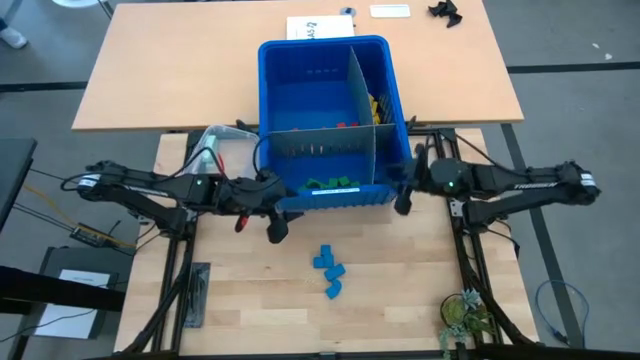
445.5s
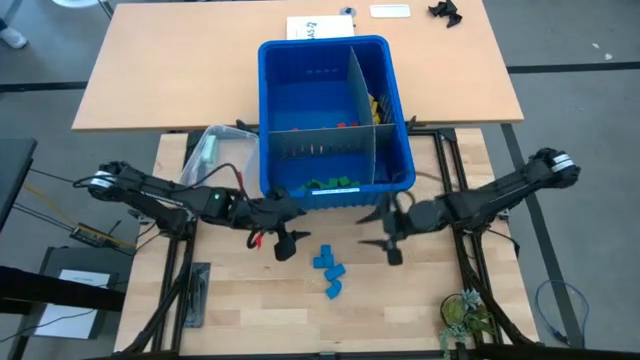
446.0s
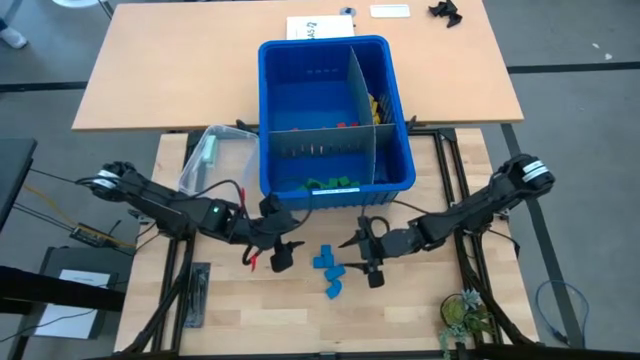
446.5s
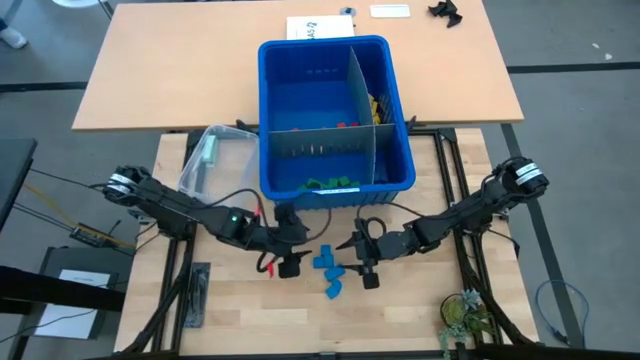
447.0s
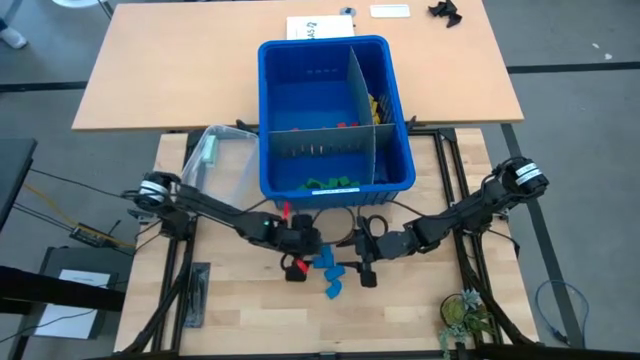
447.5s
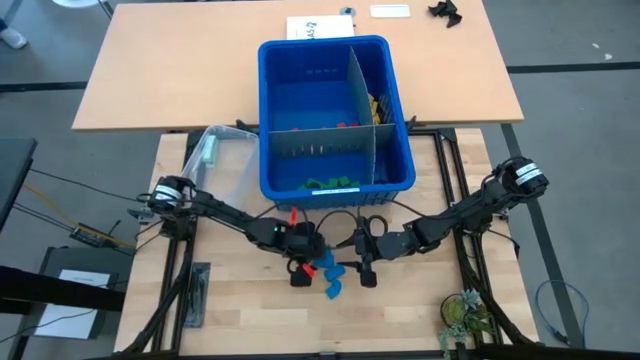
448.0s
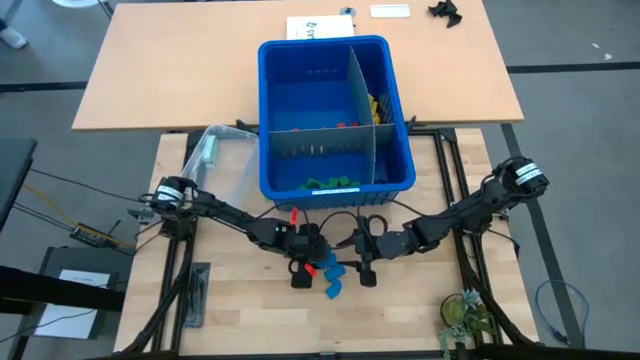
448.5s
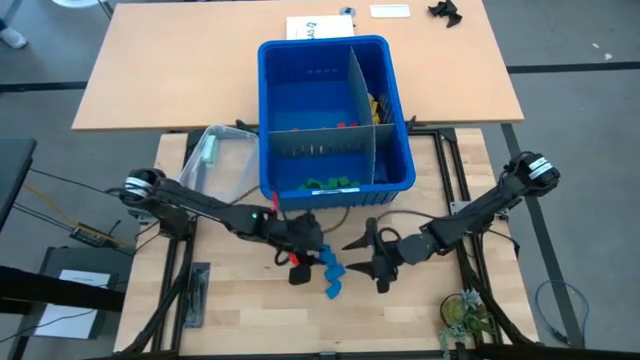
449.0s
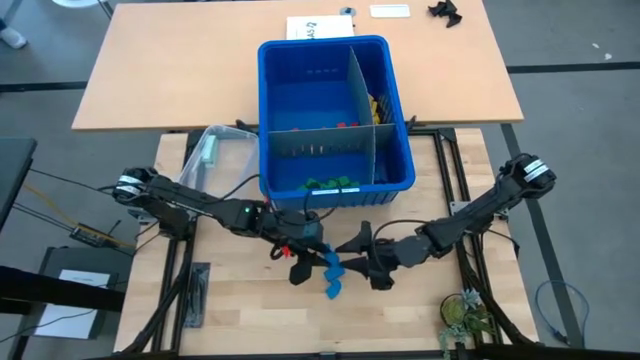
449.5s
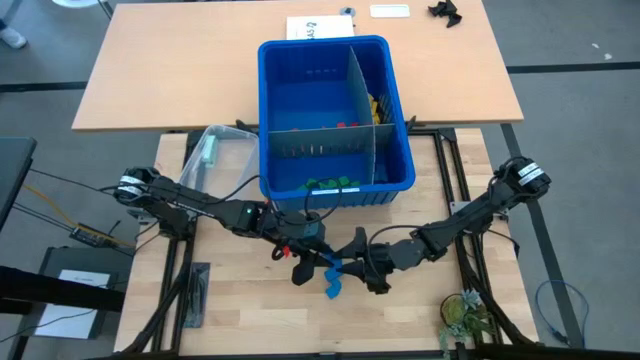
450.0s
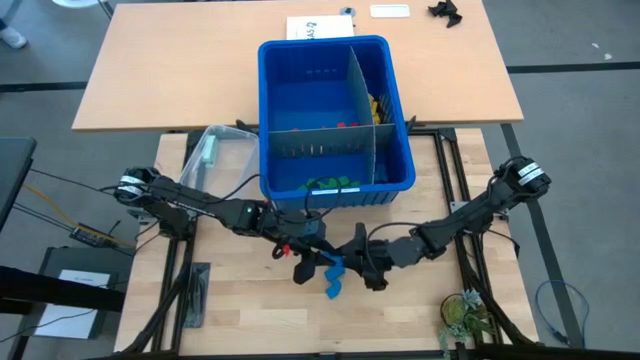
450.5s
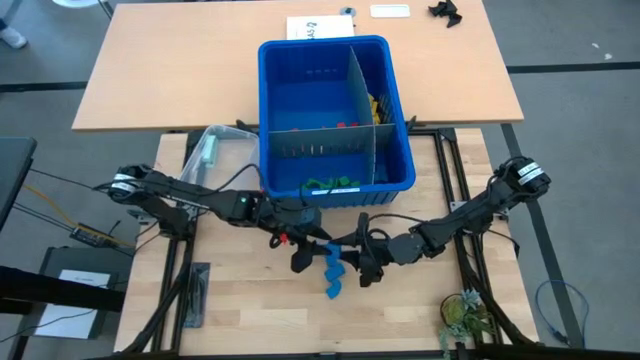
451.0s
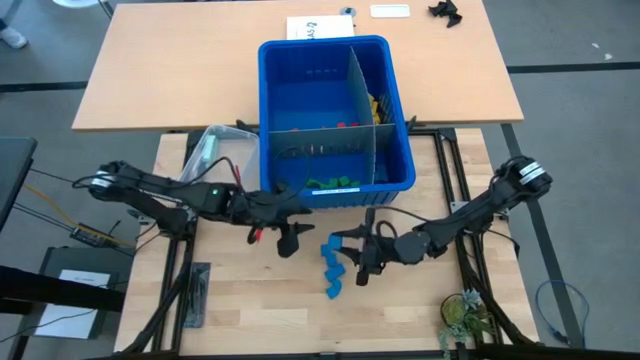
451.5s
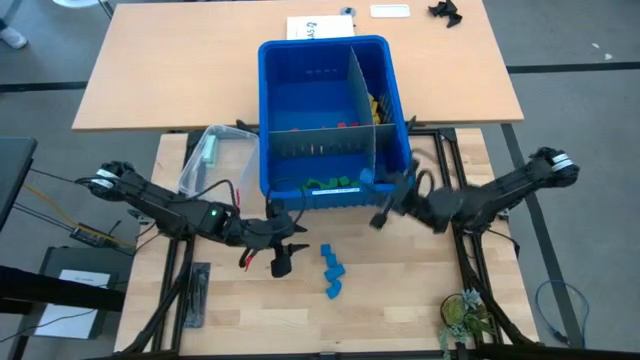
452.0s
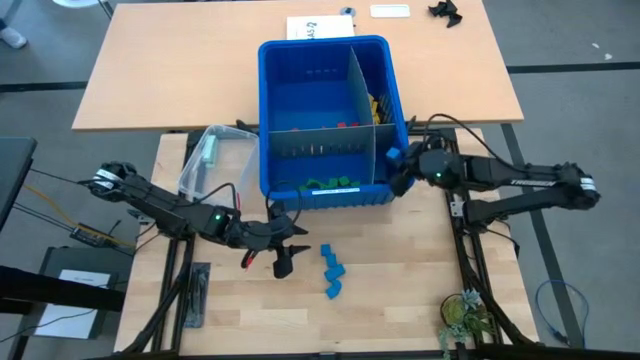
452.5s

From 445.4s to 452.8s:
Task: Sort blocks
Put the blue block into the blue bin

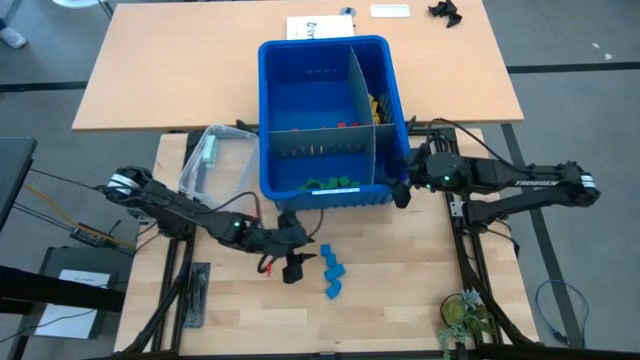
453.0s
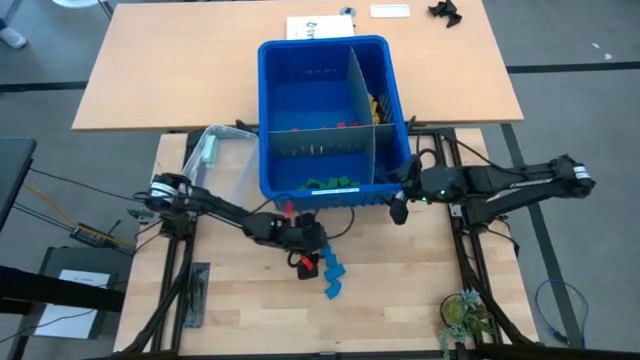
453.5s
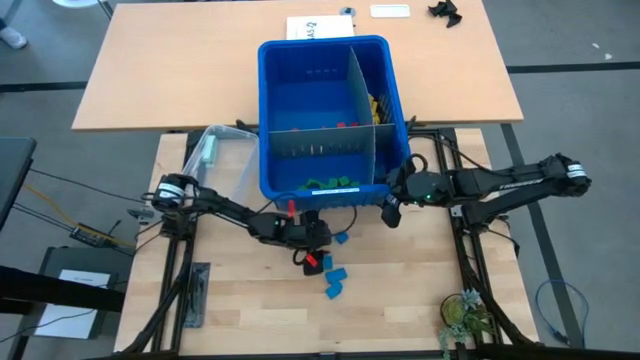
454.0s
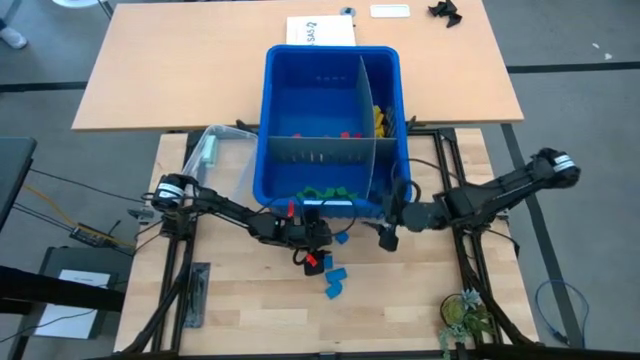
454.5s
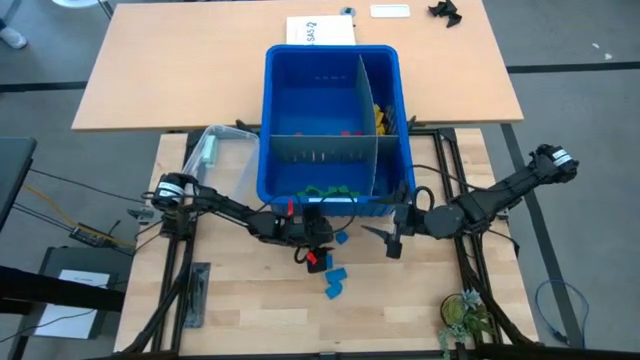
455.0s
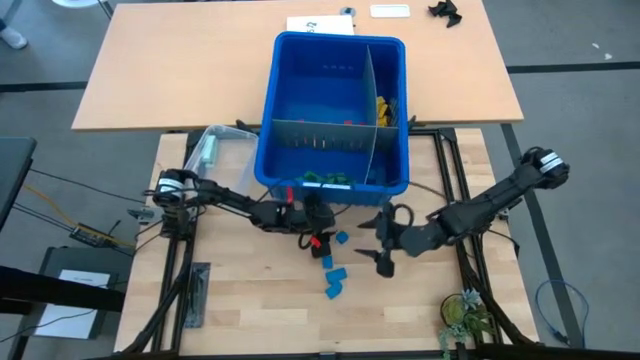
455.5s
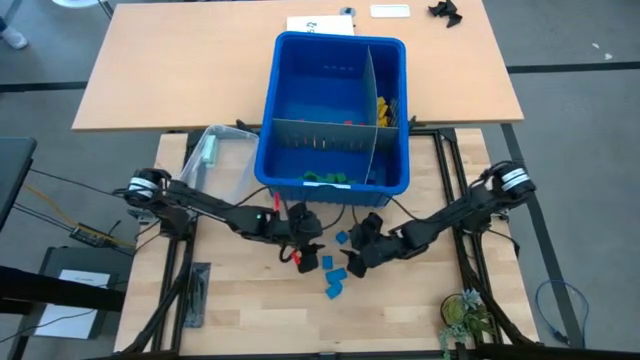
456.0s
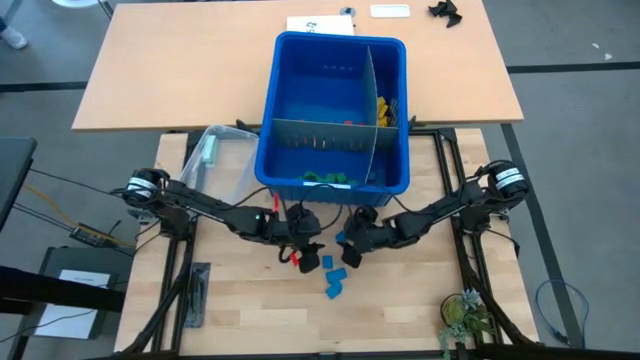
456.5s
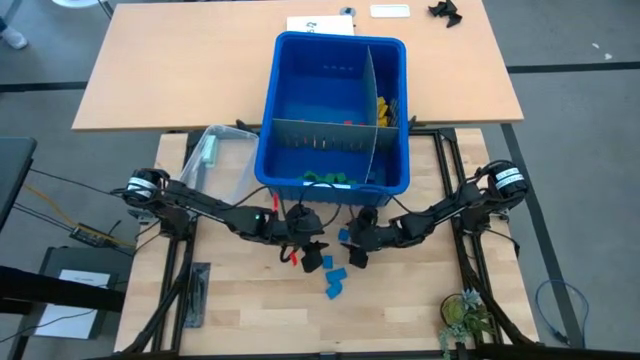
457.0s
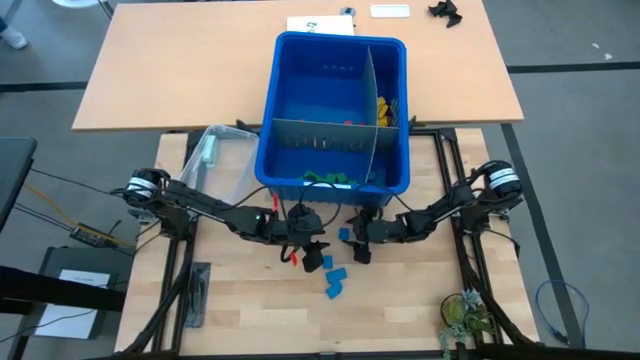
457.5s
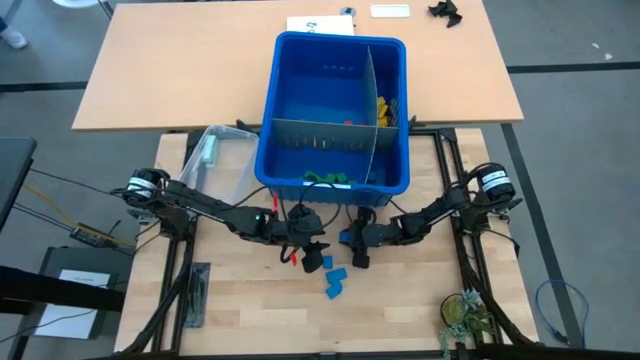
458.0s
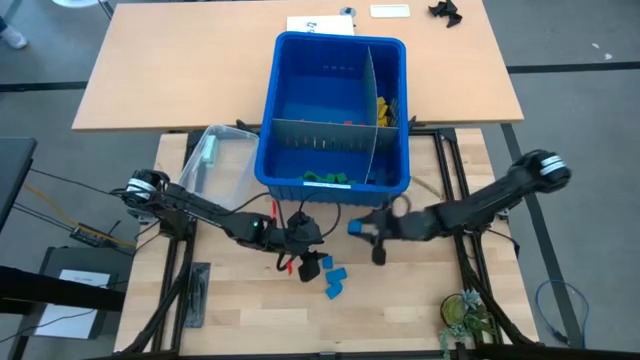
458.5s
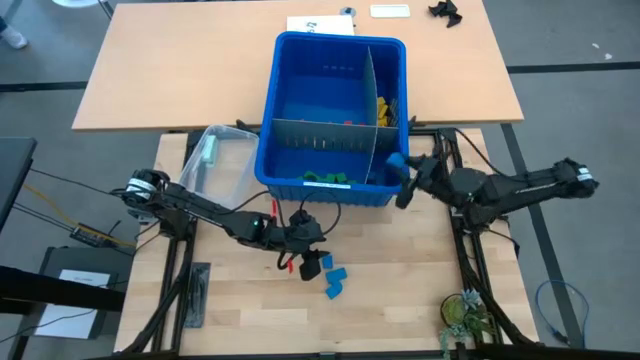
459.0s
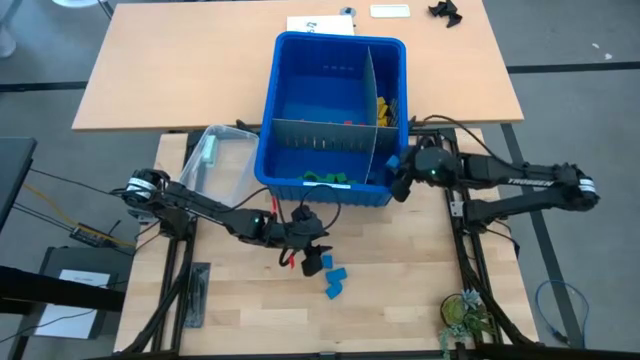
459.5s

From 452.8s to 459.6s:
Put the blue block into the blue bin

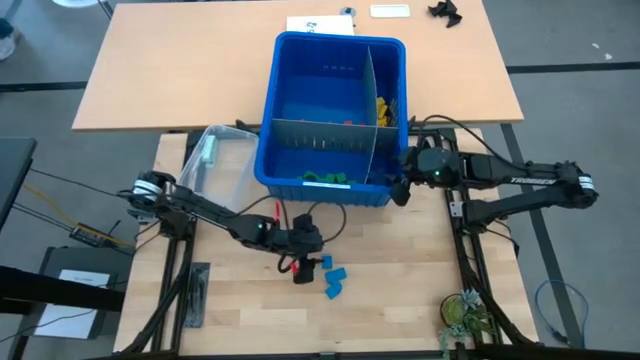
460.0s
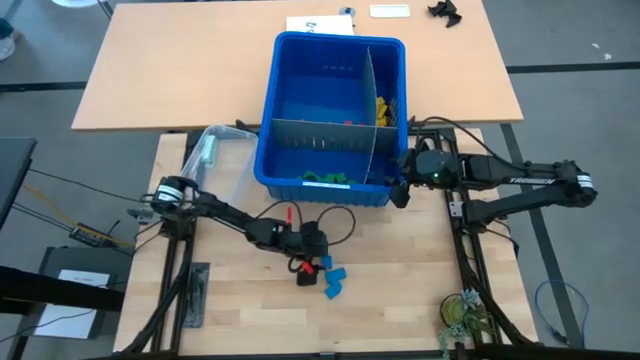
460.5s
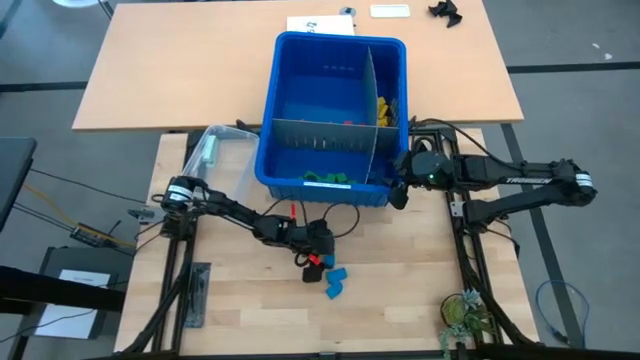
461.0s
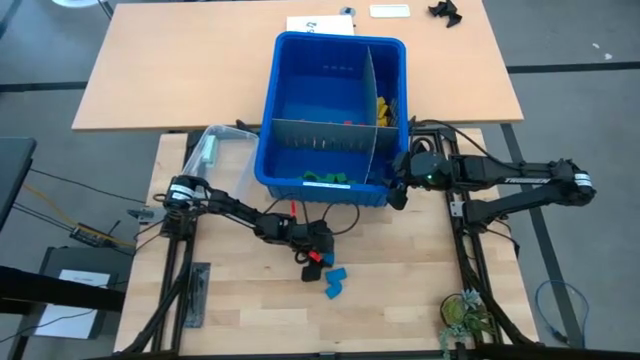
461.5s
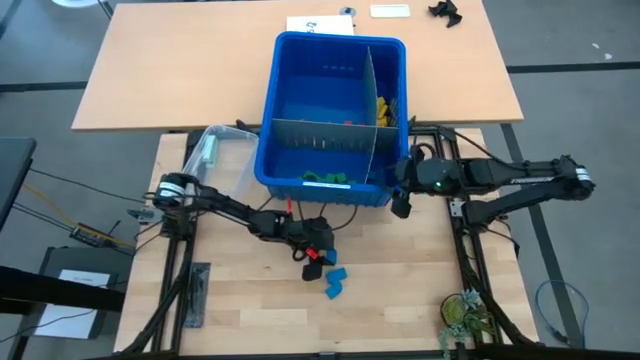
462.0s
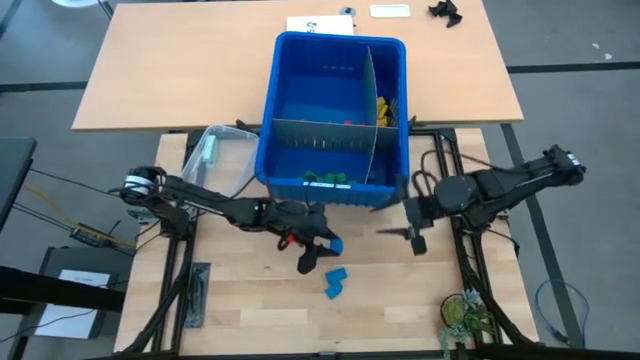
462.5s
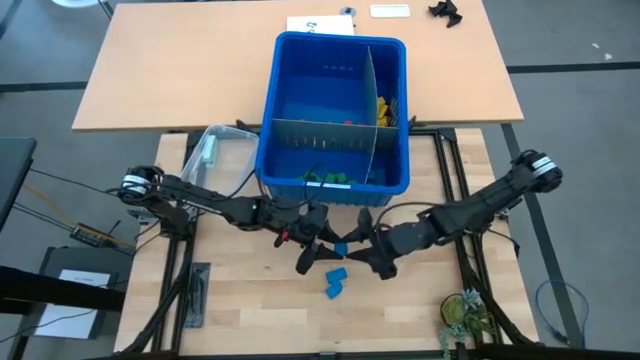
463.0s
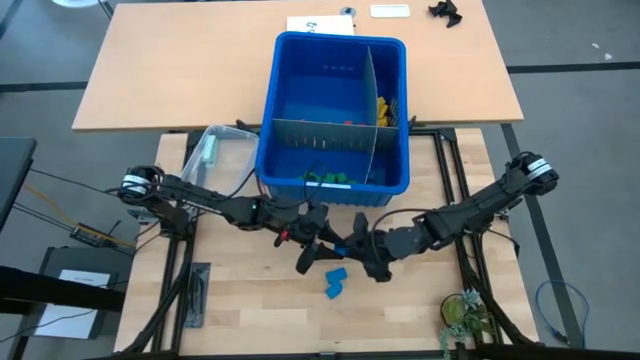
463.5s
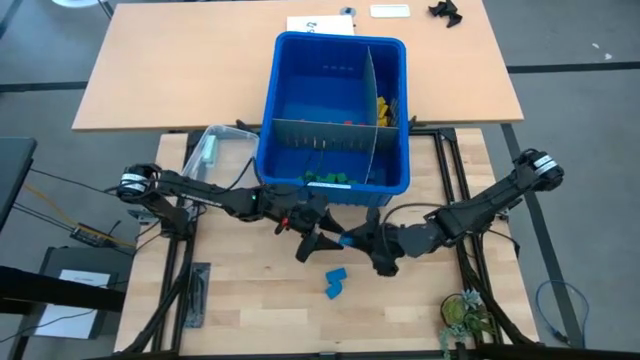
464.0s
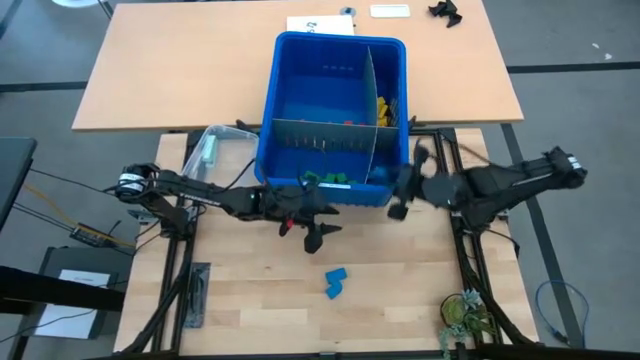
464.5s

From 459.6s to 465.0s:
Put the blue block into the blue bin

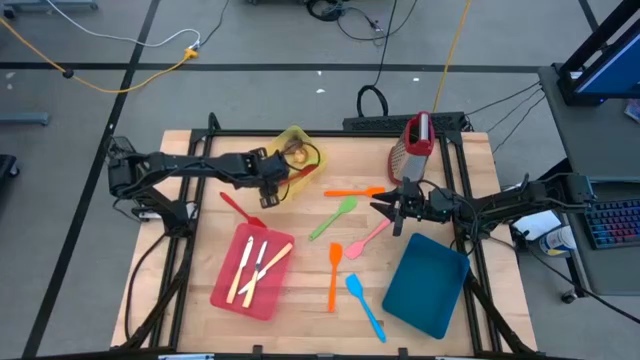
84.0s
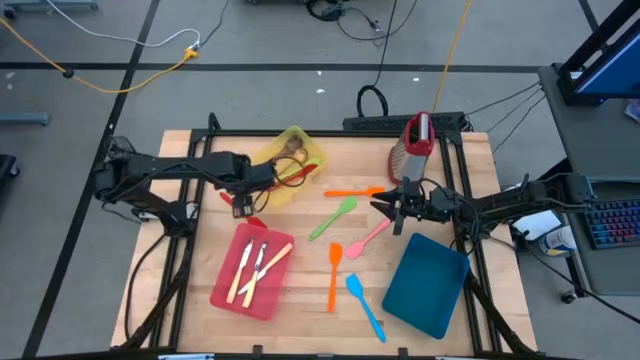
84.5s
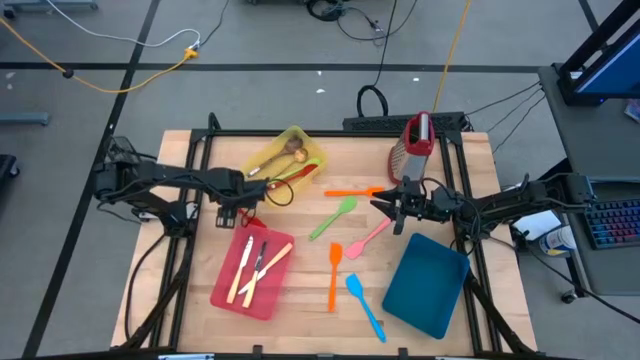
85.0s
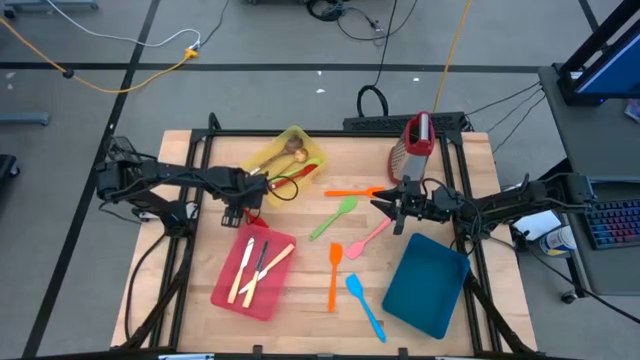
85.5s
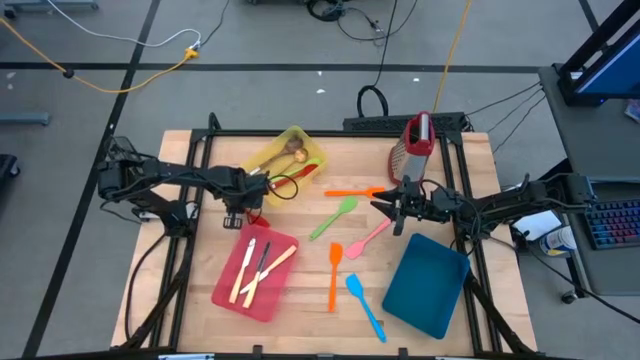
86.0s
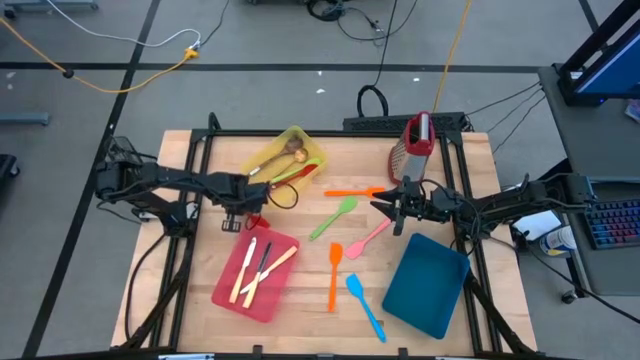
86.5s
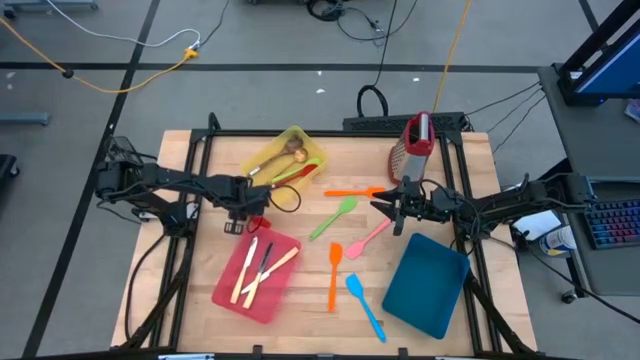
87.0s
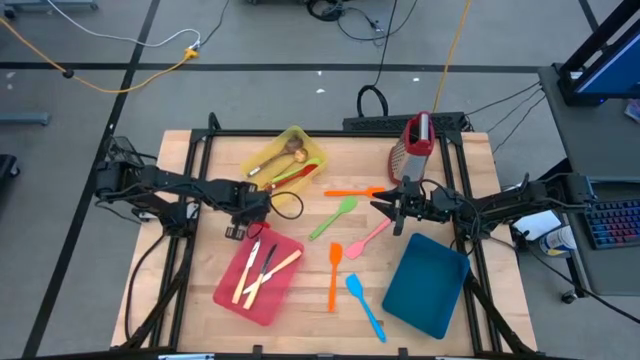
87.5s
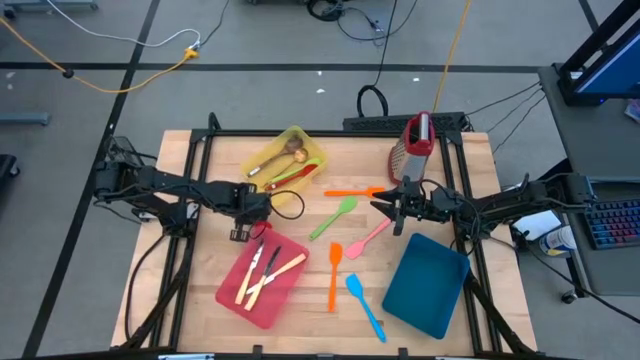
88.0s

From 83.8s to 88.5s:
Task: Pick & Place Kitchen Items
Put the red spatula into the blue bin
